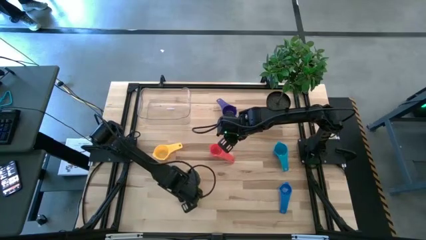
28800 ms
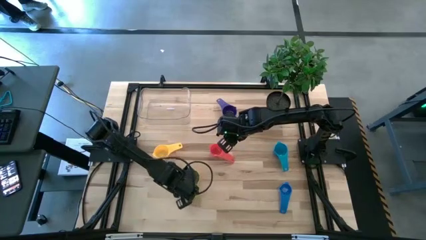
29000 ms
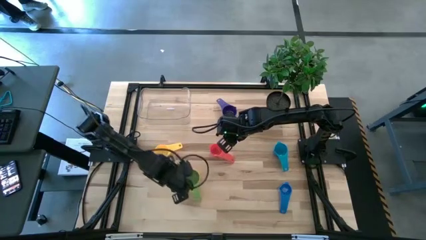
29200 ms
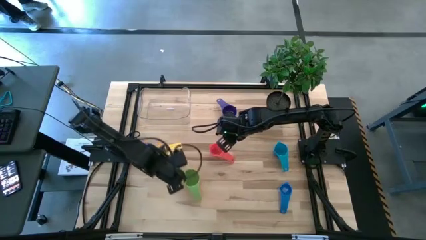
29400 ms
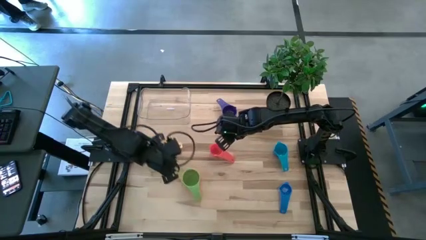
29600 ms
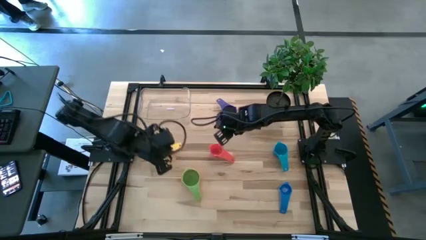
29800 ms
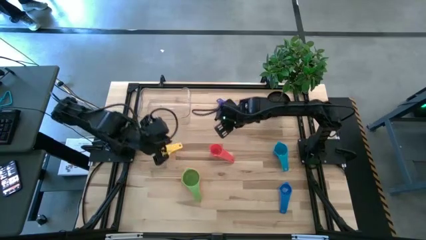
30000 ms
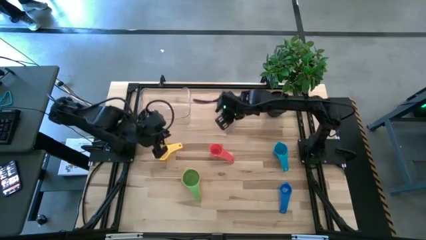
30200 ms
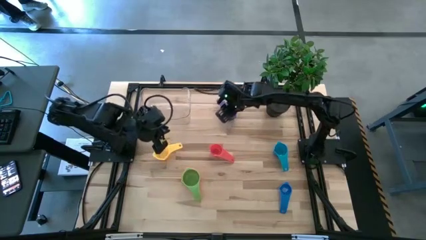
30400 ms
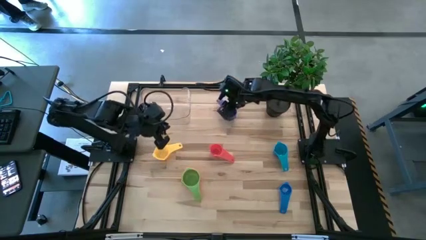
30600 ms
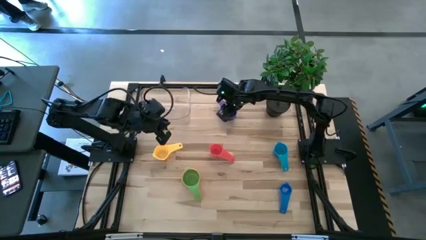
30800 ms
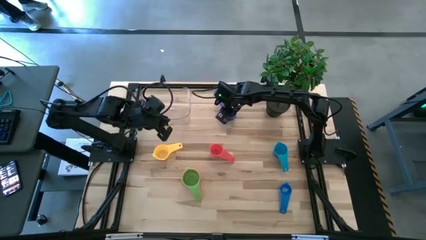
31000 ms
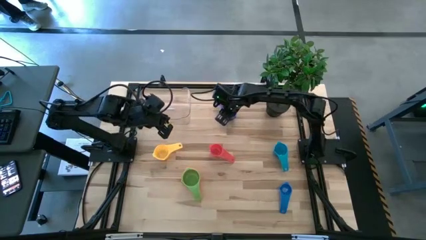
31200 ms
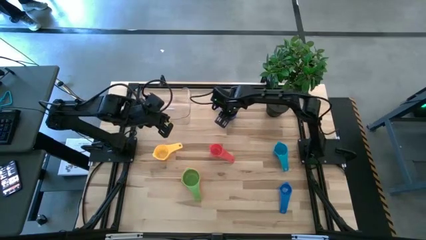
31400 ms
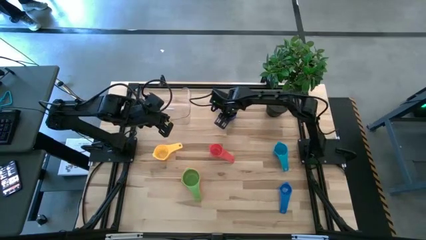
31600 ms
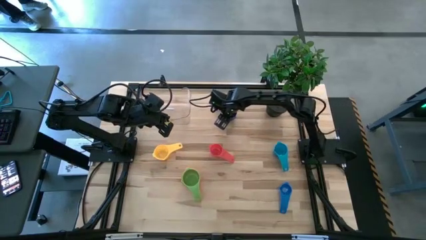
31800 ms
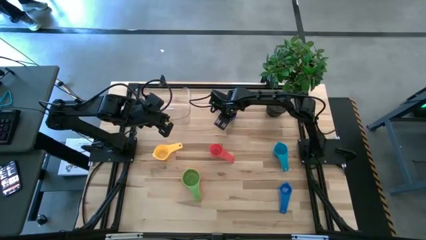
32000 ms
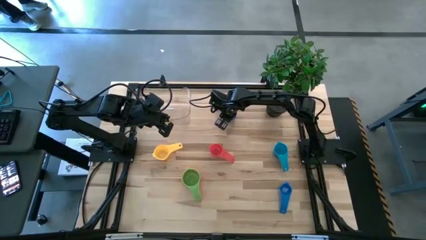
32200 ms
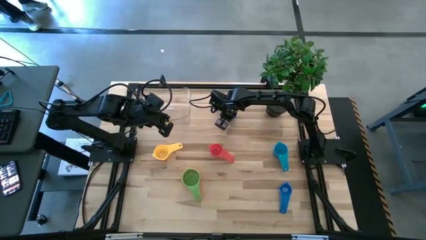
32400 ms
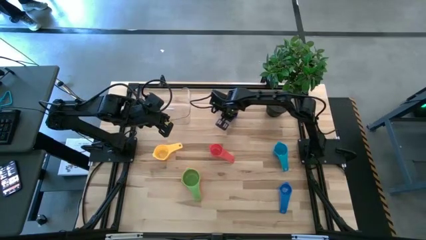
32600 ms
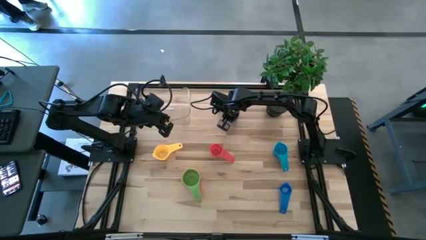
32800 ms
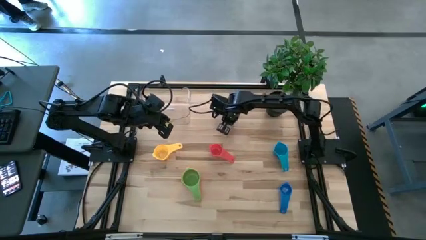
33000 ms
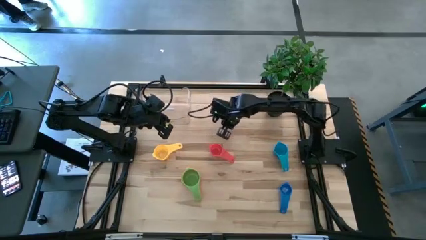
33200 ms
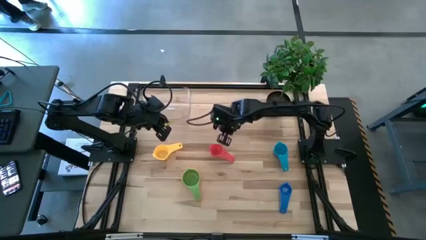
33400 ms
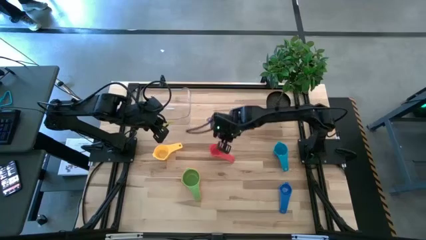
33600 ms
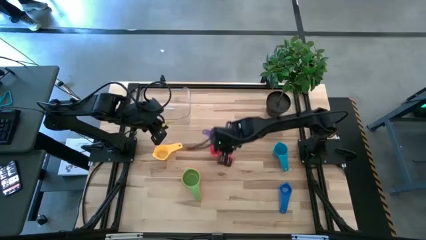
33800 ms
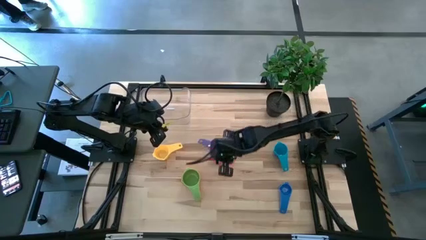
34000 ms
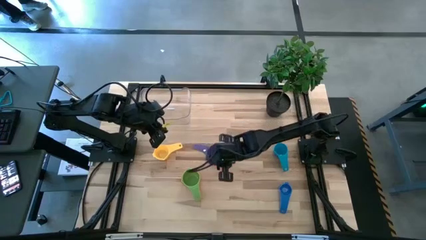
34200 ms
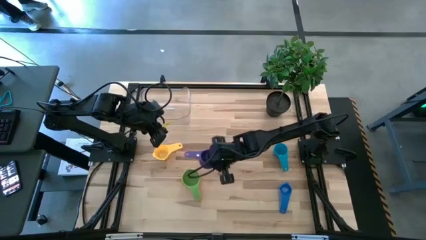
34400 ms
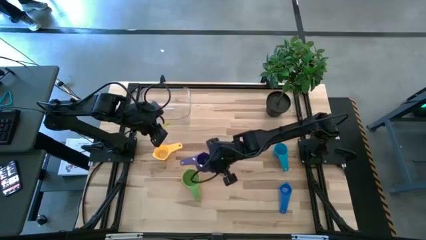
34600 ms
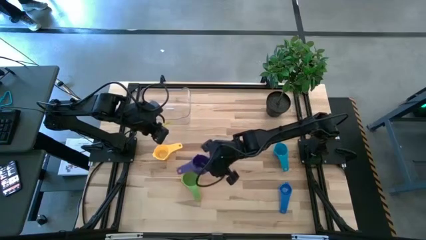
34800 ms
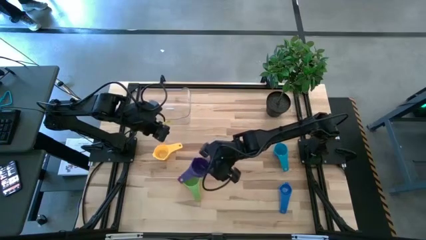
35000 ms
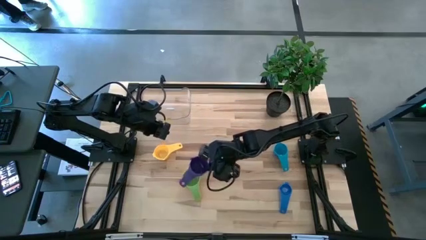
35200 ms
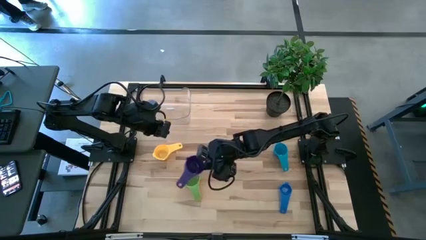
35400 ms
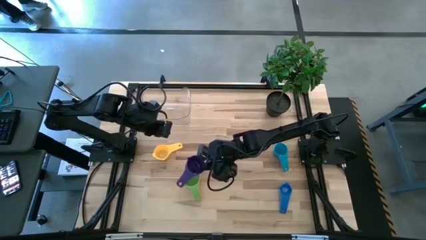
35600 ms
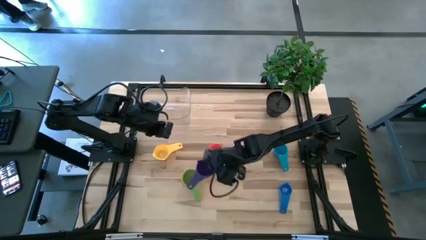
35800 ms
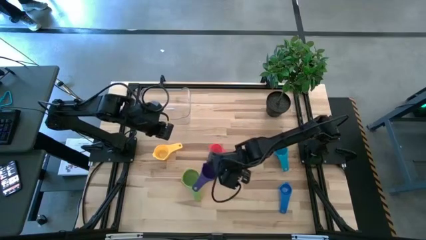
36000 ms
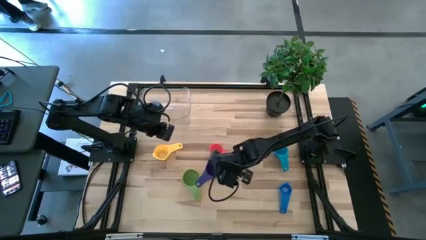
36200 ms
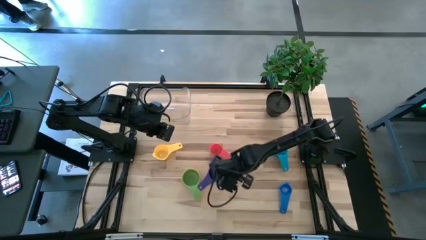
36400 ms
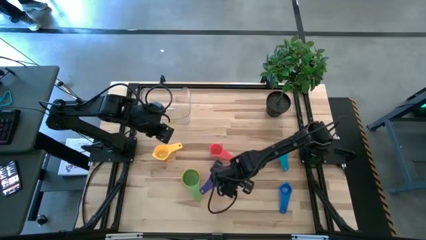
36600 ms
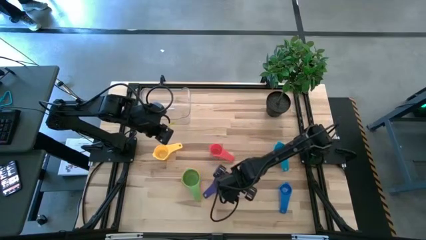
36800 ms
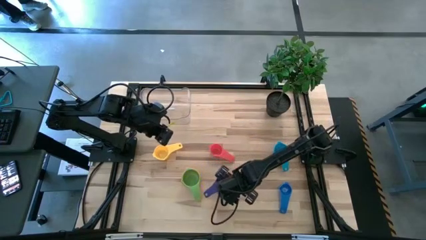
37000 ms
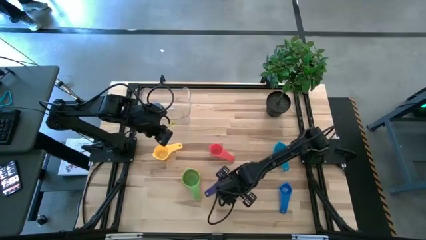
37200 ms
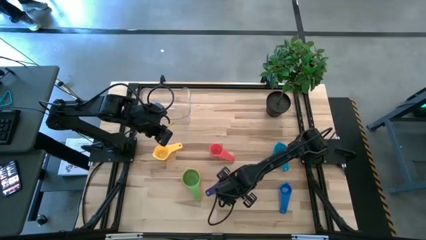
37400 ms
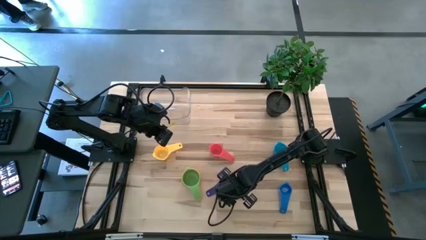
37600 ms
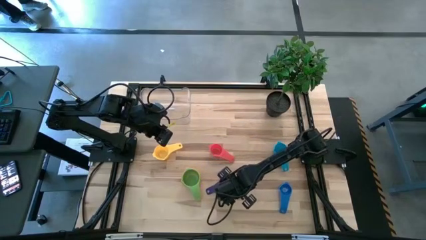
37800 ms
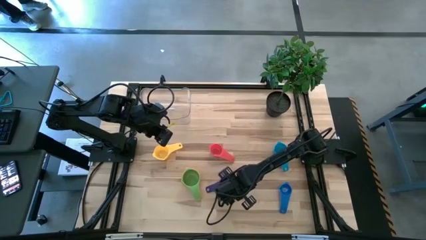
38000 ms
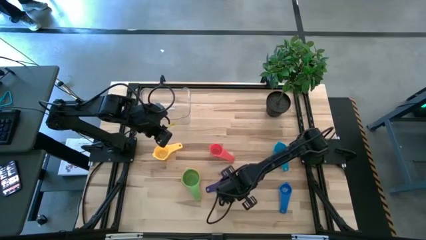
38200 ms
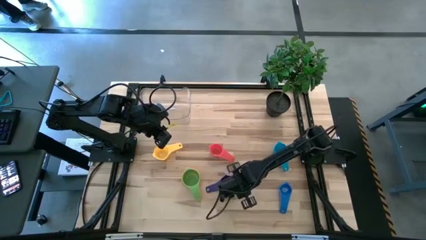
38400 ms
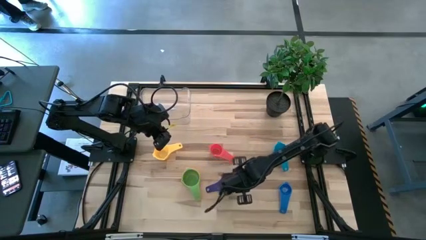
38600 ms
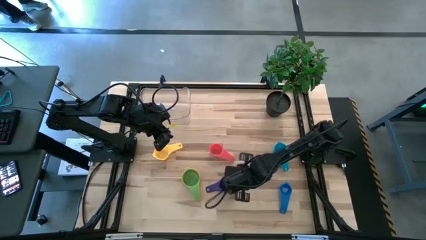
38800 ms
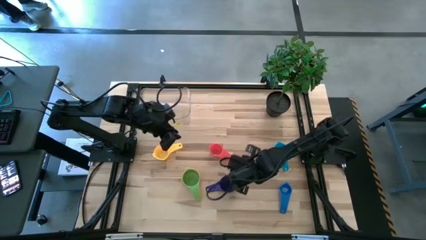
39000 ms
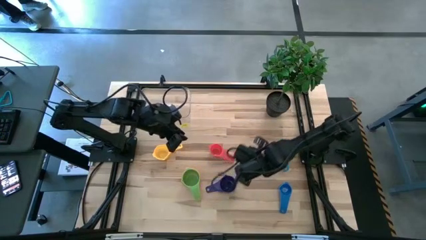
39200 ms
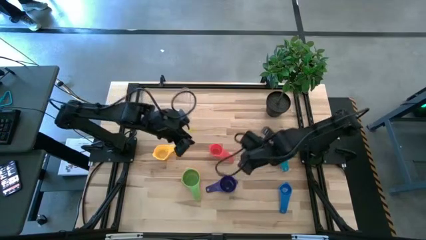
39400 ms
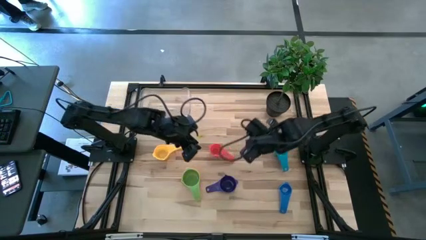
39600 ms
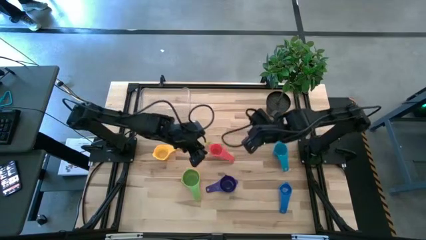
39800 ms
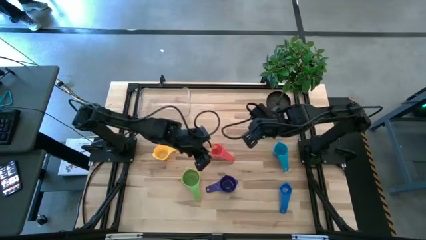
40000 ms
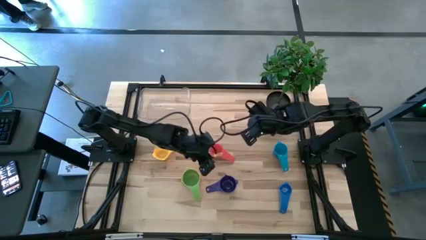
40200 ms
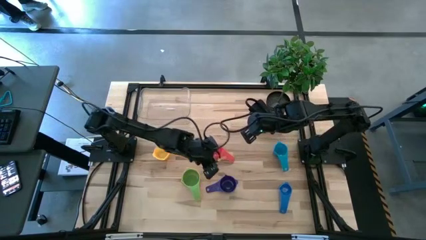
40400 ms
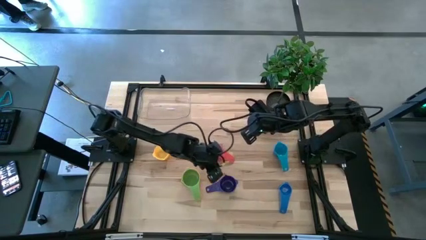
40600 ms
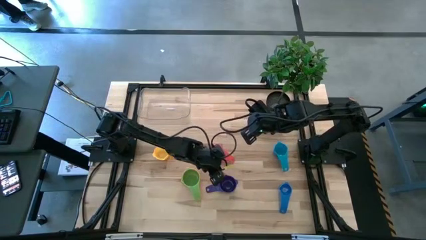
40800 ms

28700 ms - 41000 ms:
Task: Nest measuring cups in basket
Stack the violet measuring cup on top of the green measuring cup

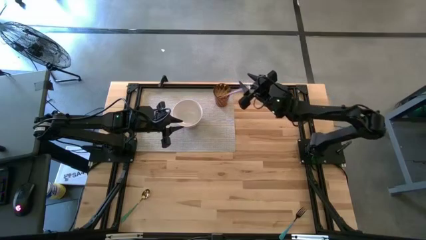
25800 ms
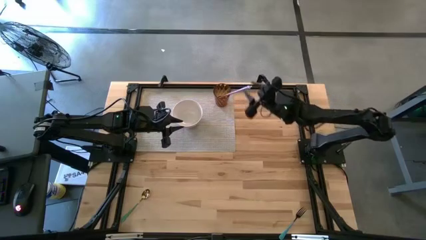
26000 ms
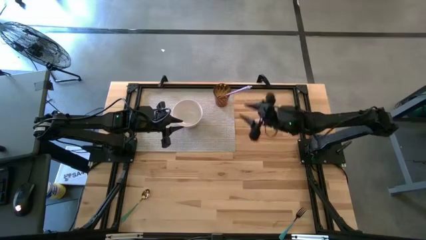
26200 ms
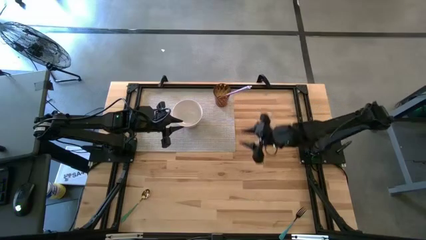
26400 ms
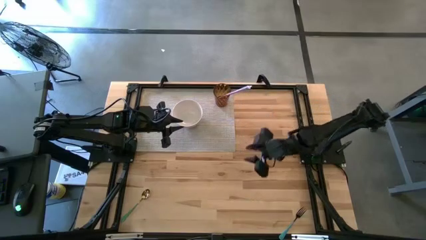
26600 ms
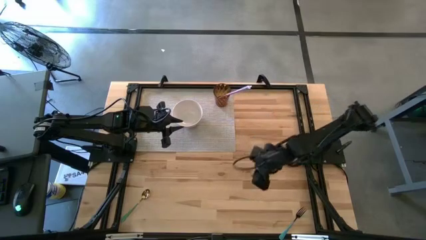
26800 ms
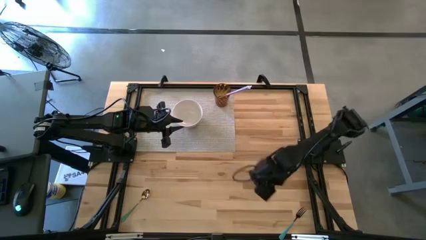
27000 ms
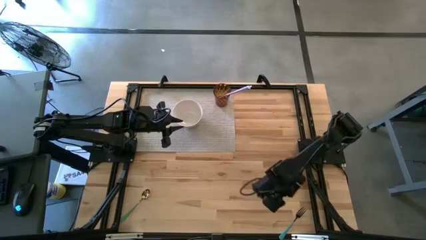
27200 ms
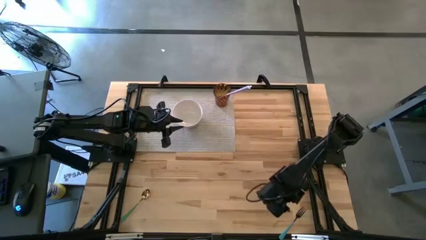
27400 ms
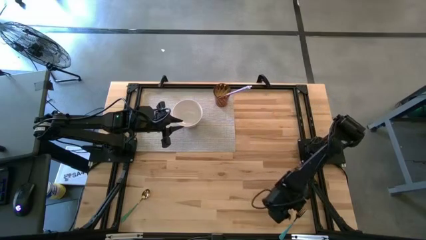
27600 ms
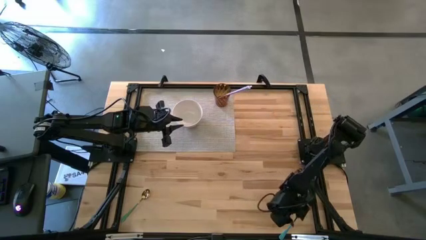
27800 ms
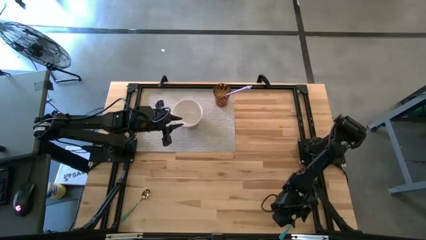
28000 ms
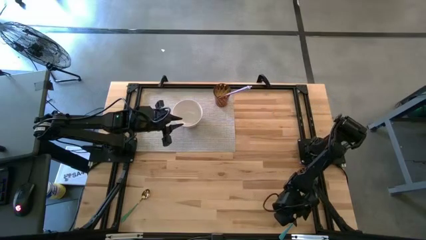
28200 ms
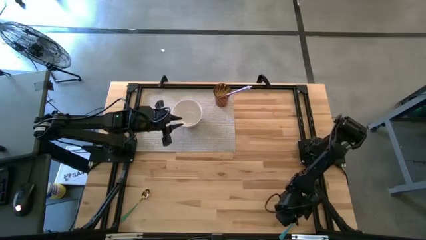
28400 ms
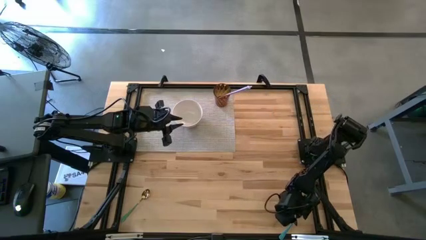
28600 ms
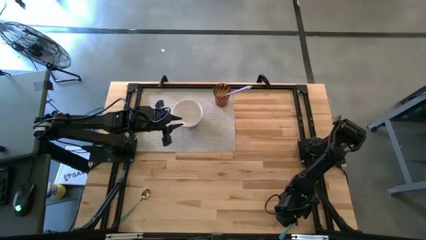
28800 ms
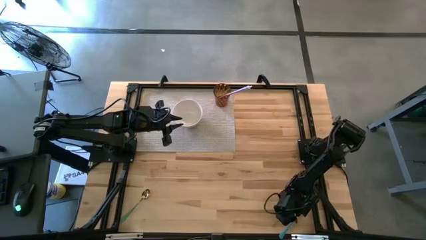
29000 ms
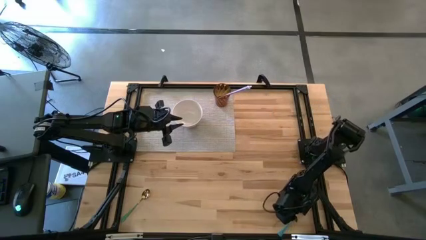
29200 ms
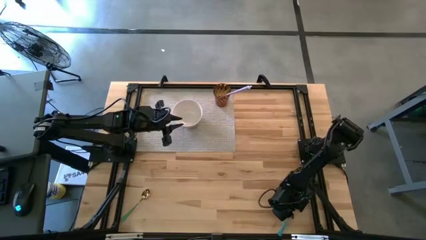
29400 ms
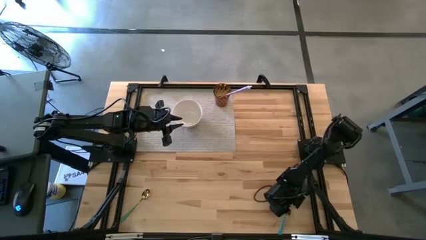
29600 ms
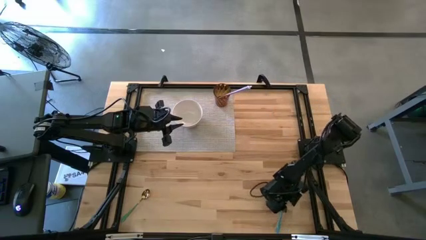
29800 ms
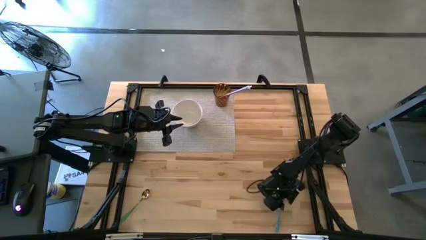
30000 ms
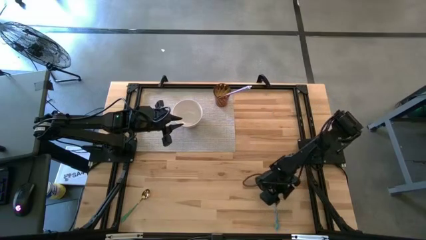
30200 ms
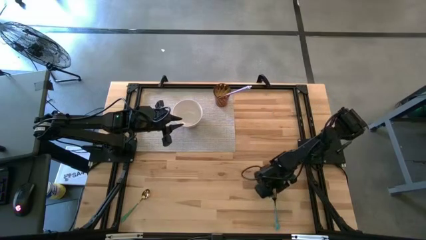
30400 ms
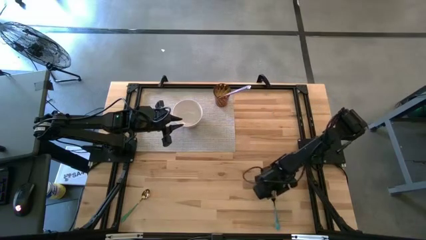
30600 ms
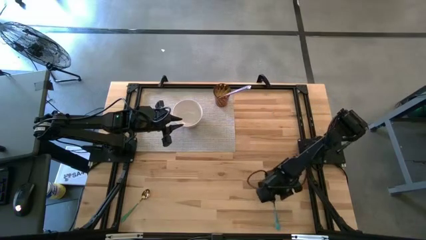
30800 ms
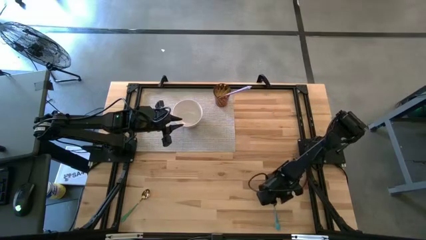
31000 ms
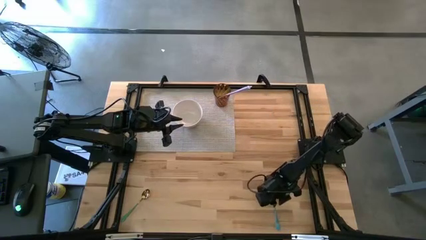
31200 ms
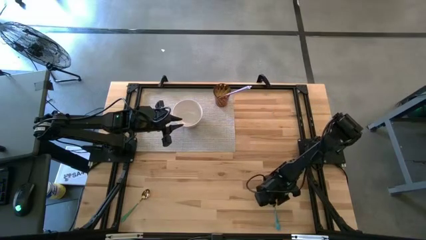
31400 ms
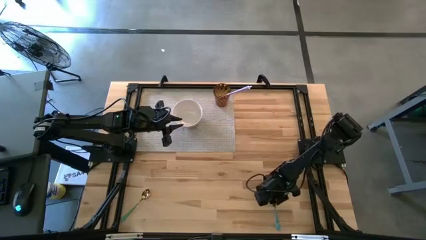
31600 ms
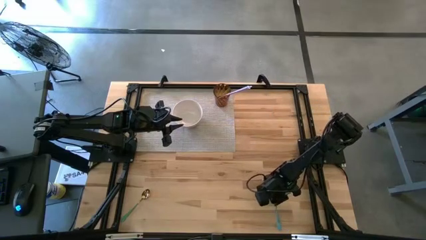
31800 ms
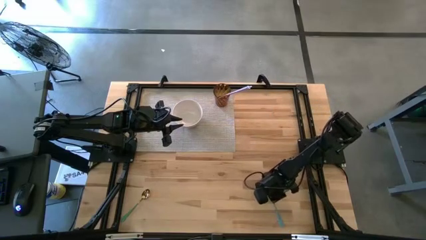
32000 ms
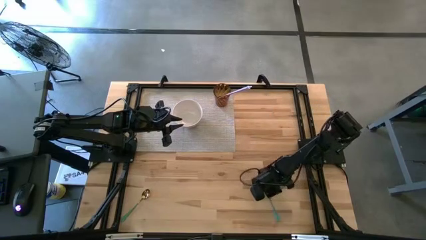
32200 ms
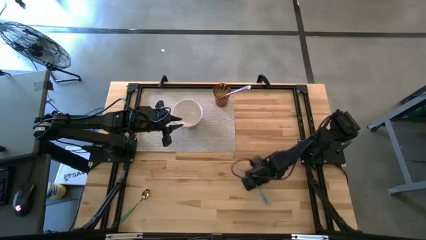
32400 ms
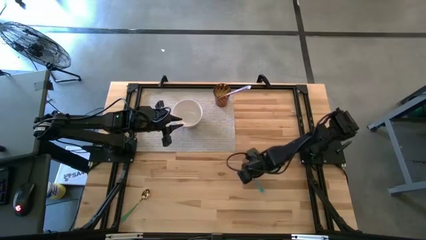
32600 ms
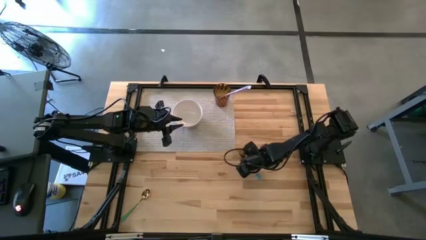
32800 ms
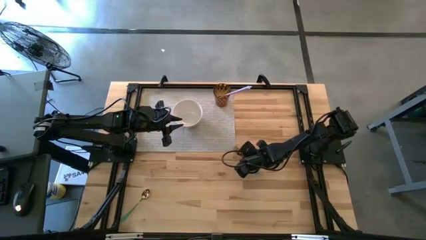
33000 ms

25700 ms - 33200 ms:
Task: Pick & Place Utensil
Put the blue fork into the white bowl
